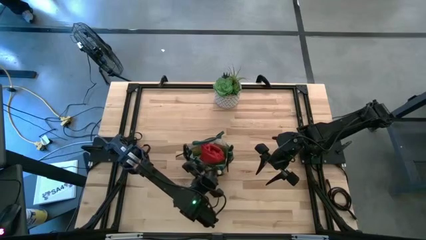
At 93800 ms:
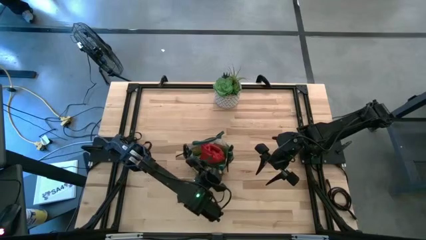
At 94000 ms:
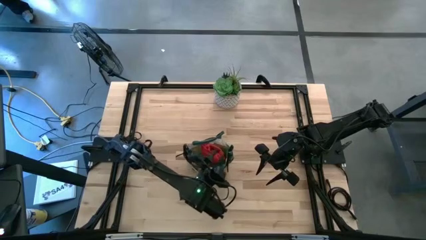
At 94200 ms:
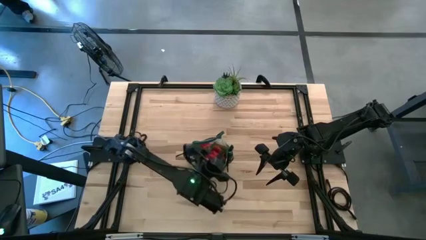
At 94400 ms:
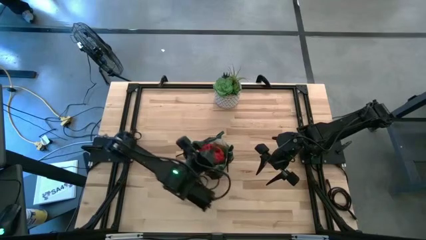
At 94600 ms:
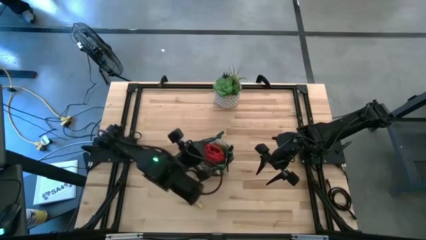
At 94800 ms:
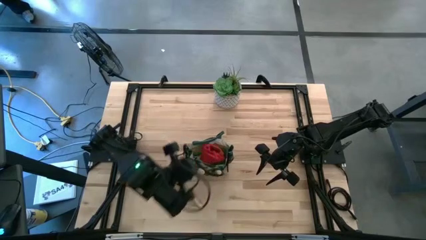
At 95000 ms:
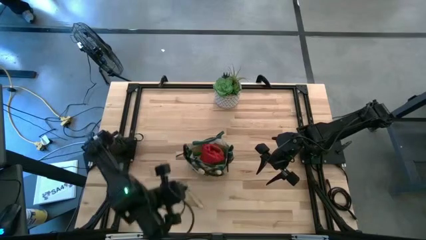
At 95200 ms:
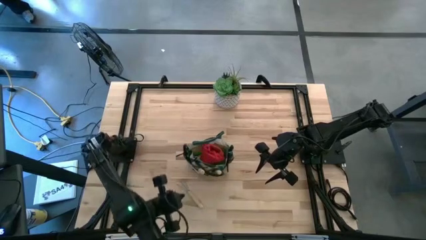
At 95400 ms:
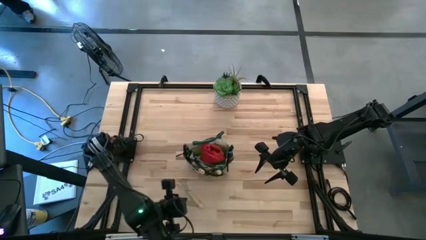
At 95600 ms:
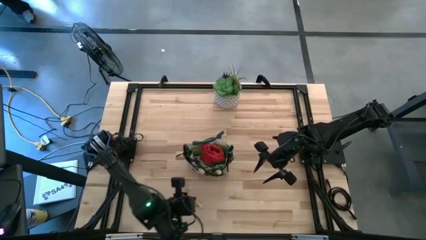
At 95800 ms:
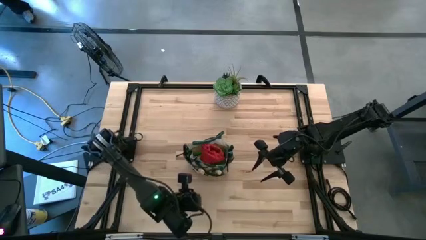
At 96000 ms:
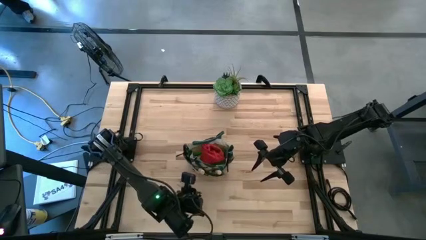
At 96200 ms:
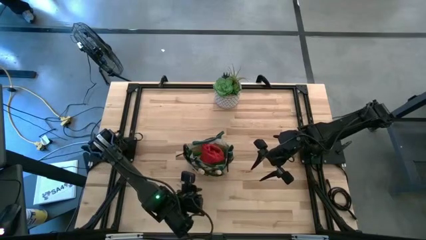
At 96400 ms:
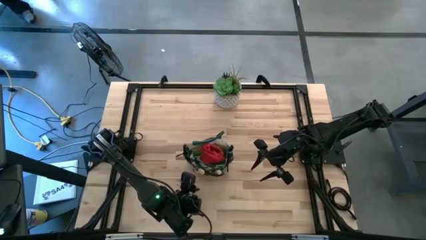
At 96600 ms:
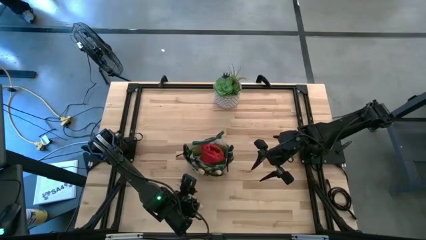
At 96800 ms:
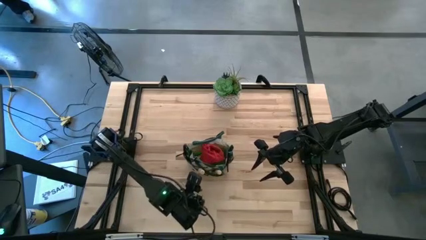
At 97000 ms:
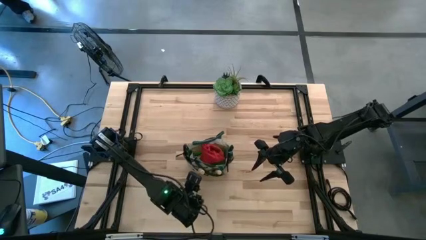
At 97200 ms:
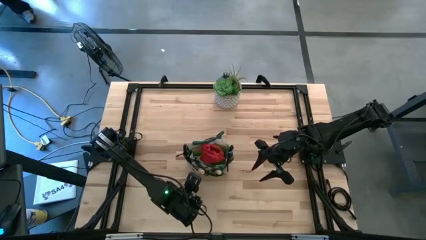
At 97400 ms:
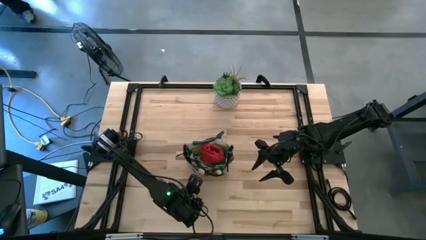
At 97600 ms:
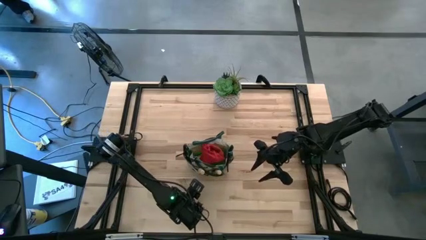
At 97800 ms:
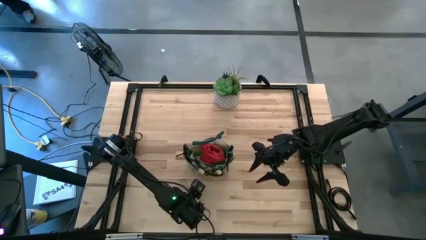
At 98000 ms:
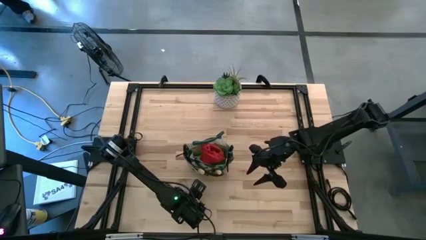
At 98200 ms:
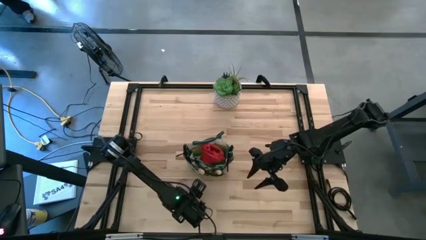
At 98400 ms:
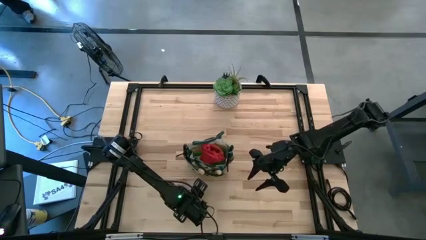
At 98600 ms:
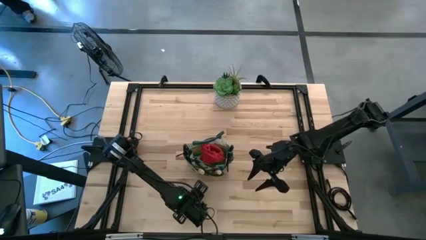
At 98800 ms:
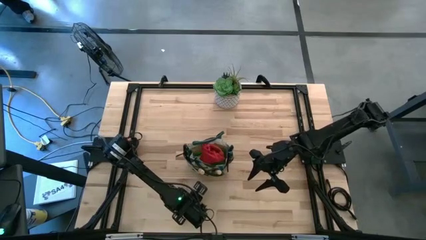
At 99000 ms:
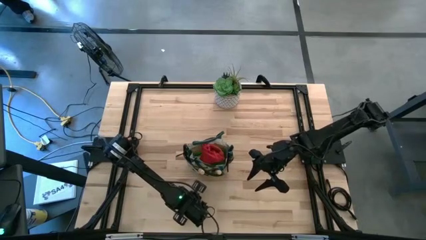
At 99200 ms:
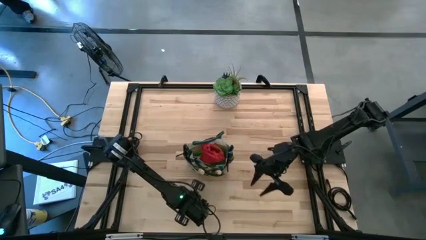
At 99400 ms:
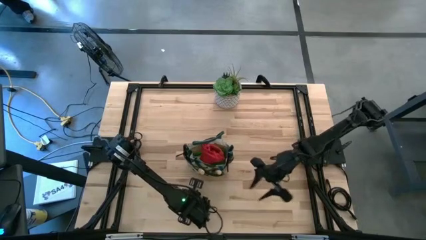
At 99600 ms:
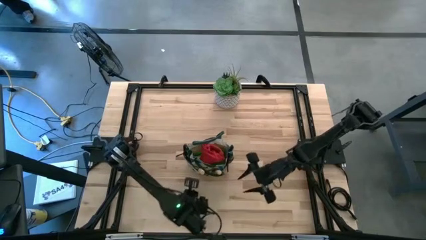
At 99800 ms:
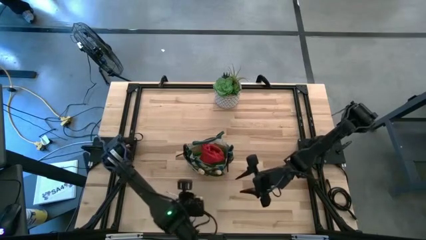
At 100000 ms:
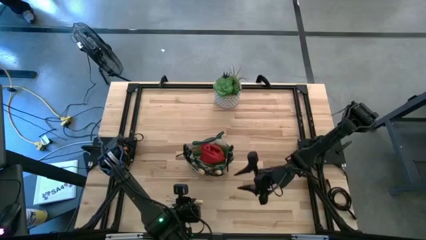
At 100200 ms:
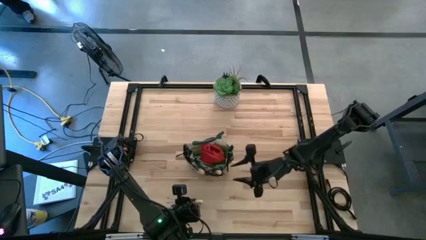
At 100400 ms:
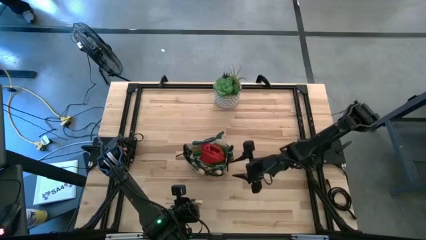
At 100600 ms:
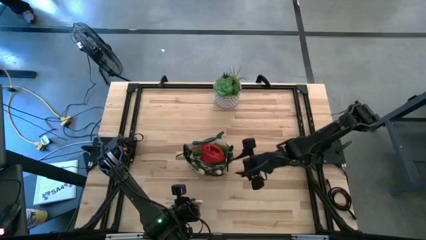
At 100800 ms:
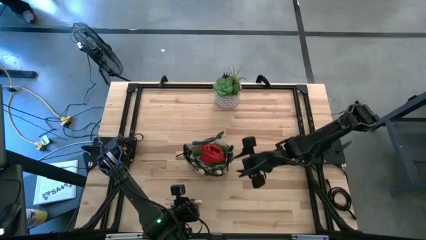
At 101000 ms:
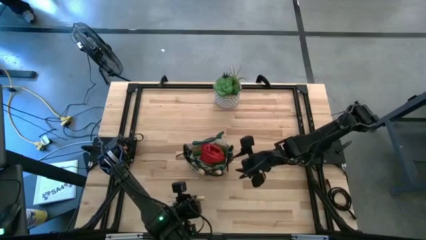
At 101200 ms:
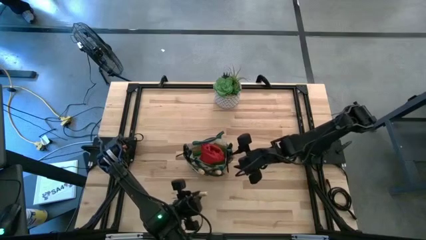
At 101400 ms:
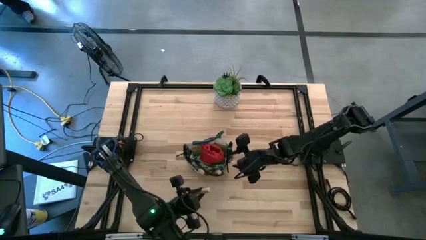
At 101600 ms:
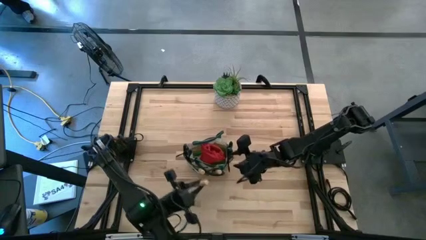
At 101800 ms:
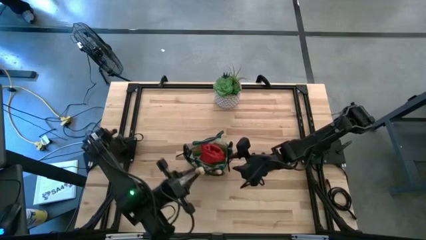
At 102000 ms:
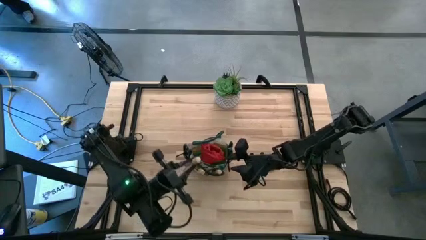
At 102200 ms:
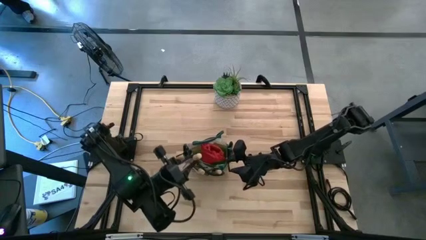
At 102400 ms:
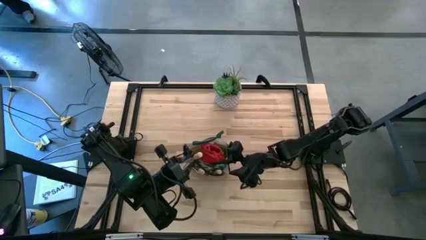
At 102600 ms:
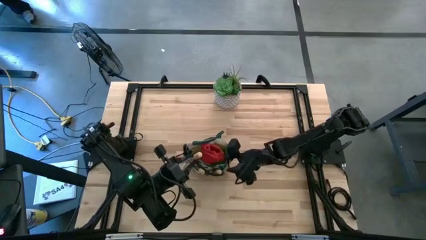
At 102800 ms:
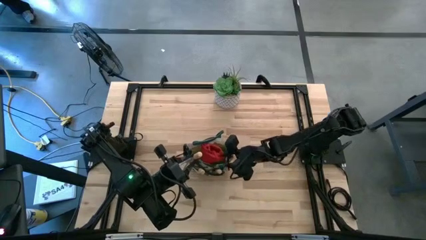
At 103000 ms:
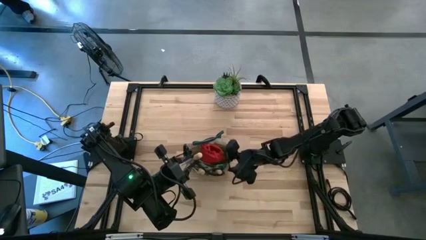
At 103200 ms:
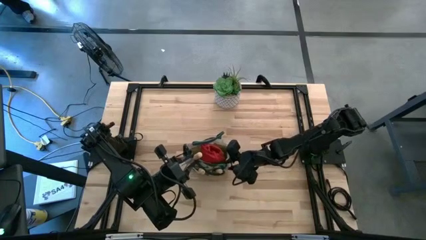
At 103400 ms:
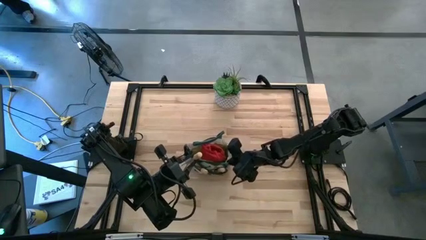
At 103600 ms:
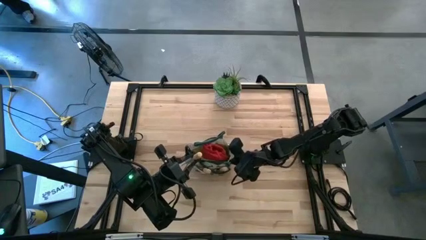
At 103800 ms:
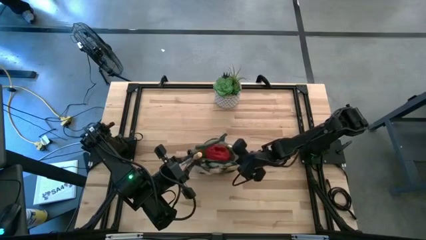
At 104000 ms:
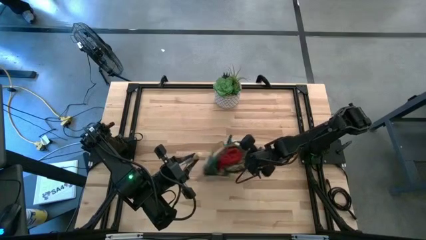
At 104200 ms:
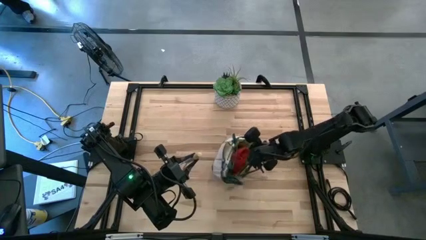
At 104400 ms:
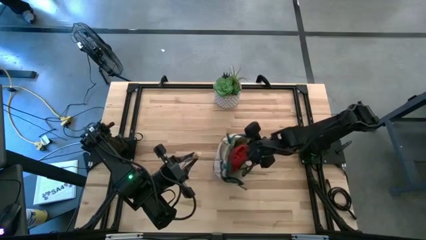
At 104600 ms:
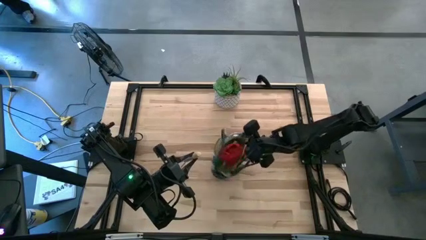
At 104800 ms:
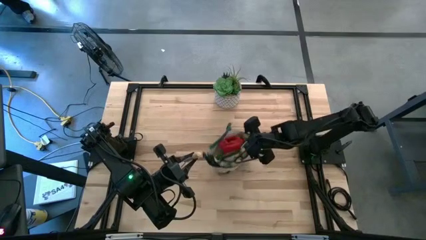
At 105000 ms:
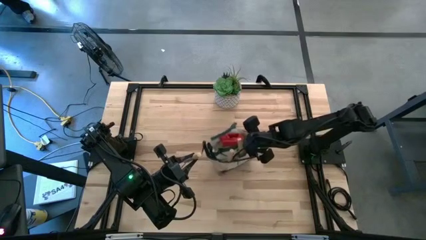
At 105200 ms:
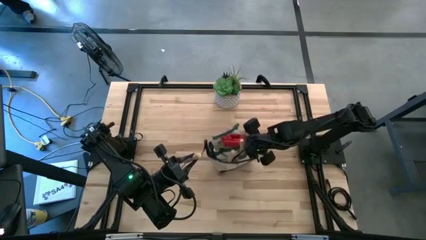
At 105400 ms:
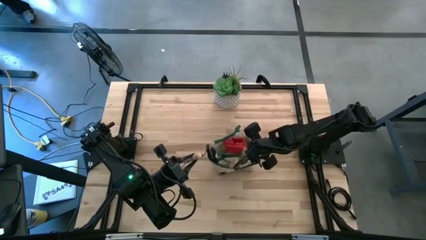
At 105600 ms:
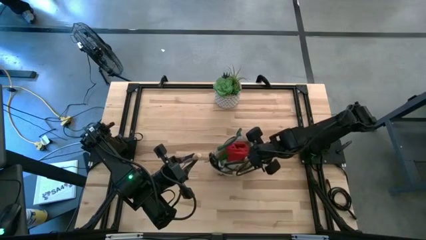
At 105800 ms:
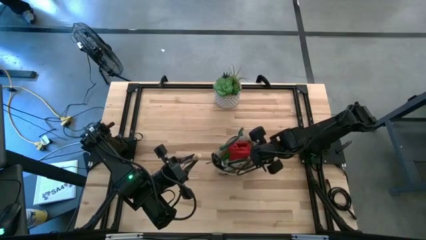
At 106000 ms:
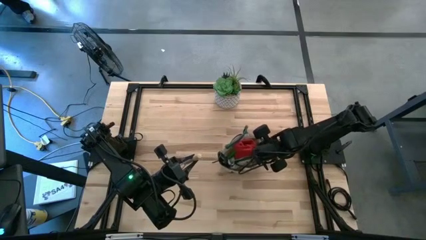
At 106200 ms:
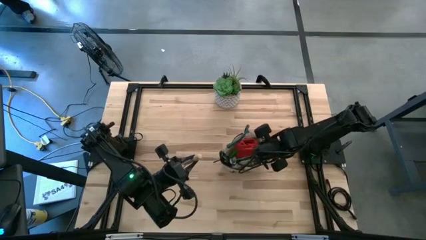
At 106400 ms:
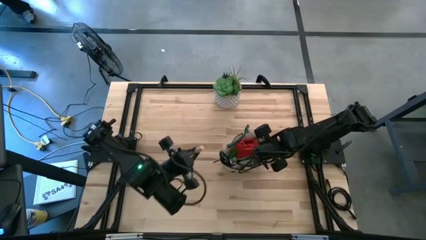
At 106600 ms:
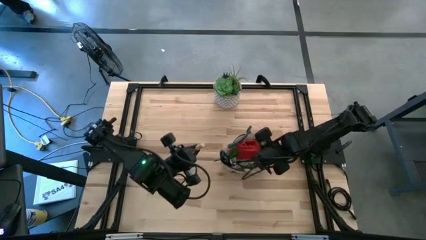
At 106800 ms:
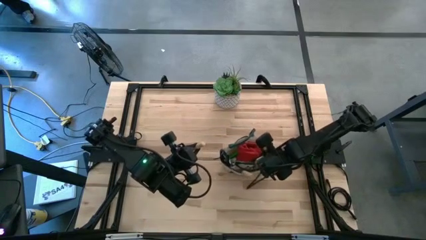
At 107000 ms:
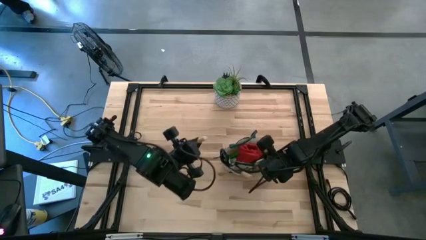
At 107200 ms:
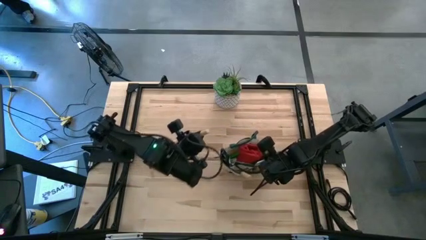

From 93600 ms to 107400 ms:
Task: Pick & Place Garden tools in Gardening bag
Put the light brown hand rake into the white gardening bag
